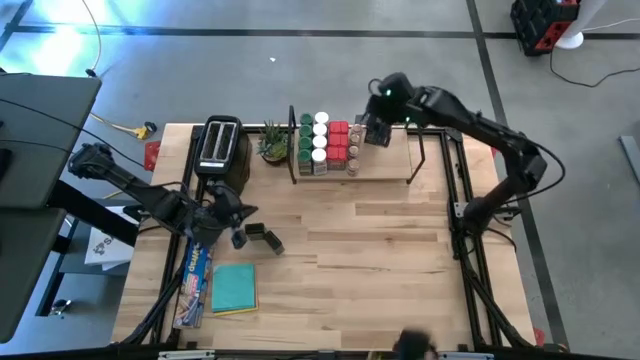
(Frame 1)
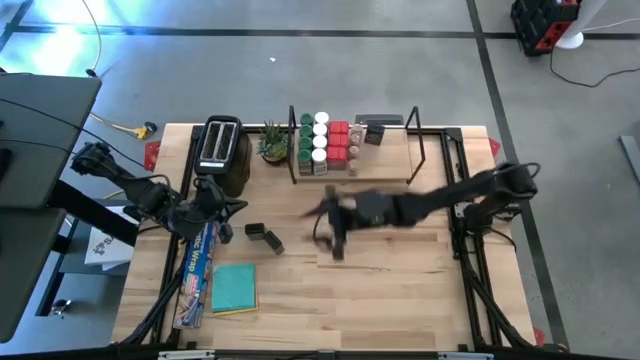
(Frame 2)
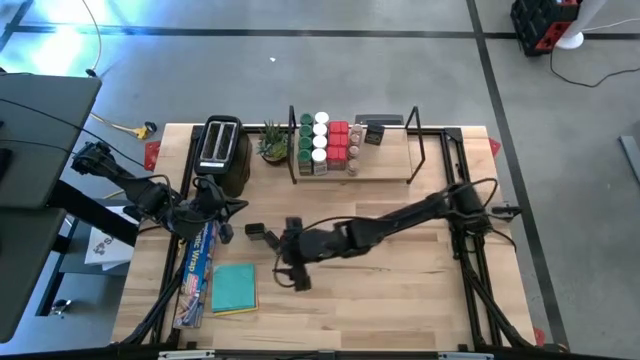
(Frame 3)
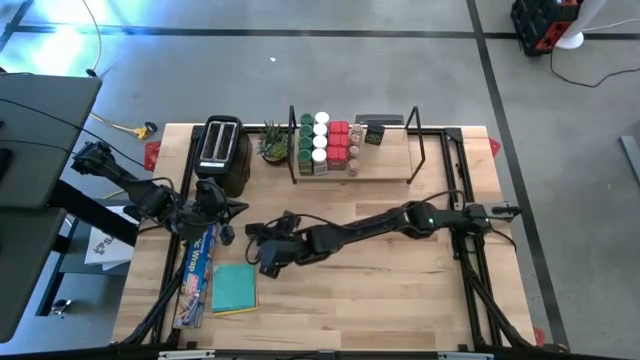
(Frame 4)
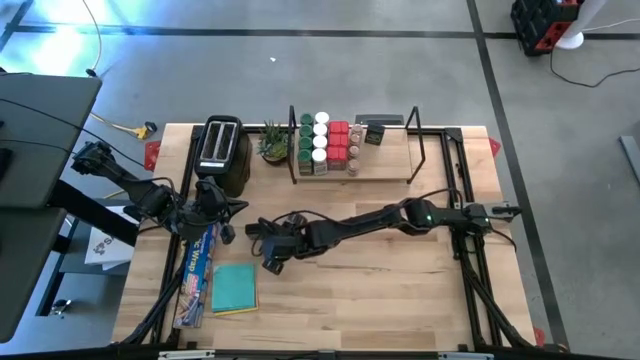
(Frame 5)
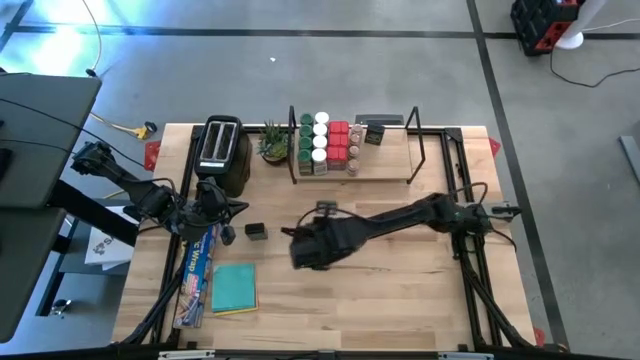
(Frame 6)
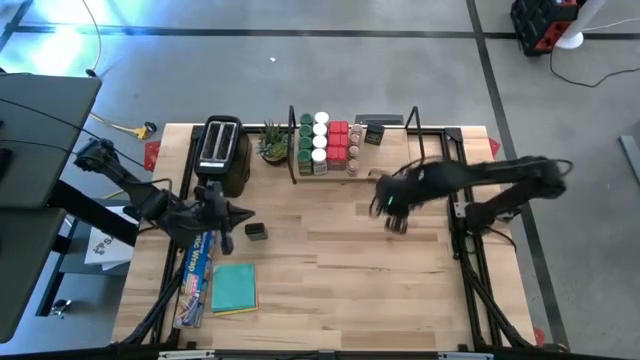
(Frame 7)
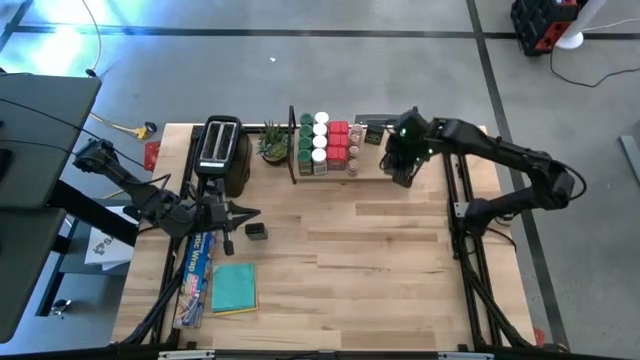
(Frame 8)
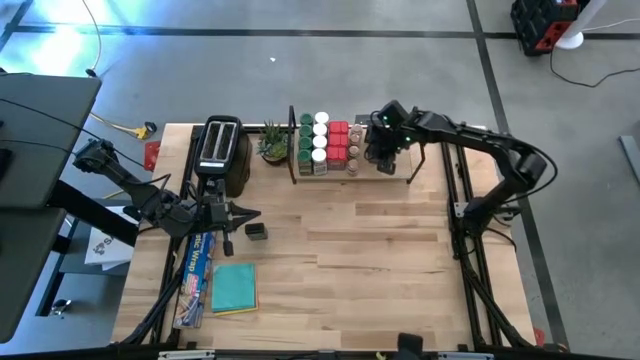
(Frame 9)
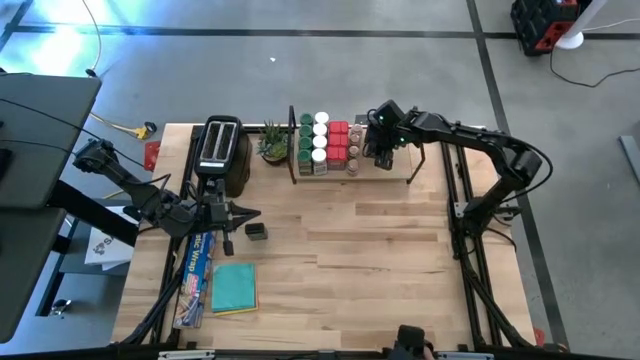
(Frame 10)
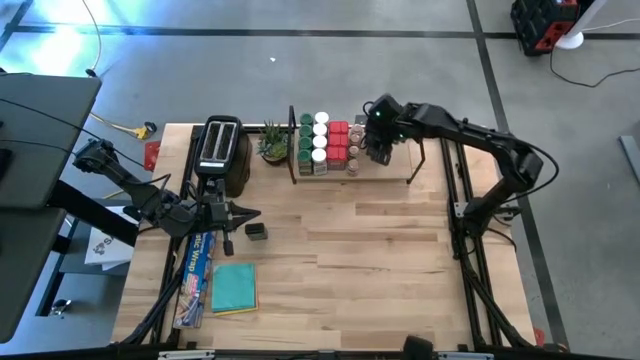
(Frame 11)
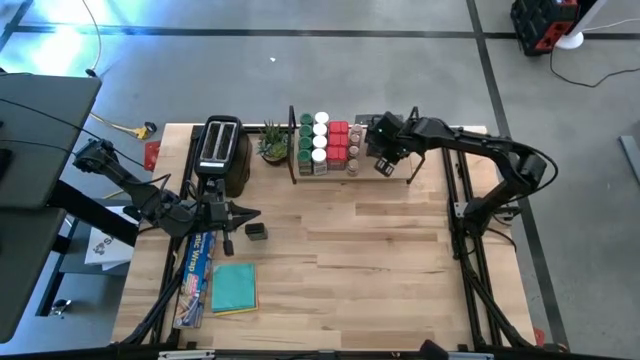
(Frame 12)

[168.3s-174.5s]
Task: Shelf spices
Put the right black seasoning can on the shelf aligned with the other black seasoning can

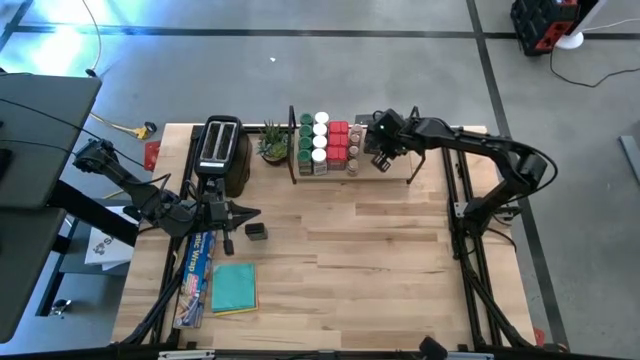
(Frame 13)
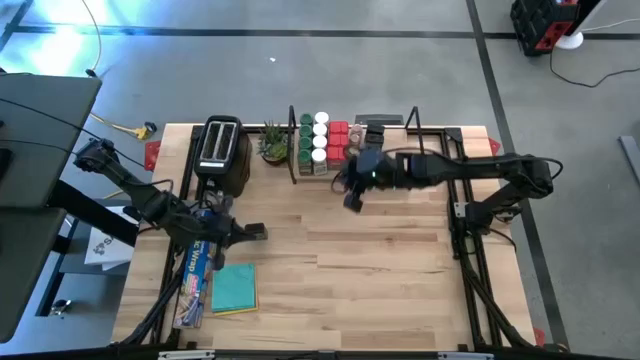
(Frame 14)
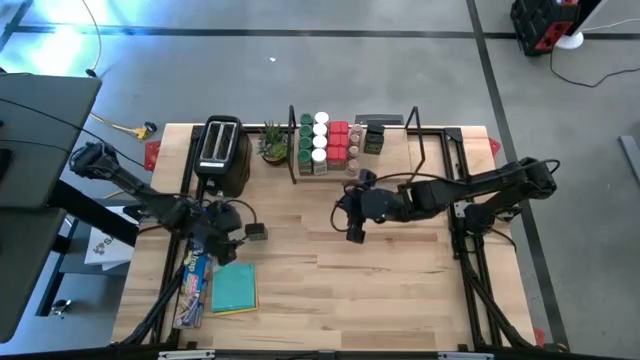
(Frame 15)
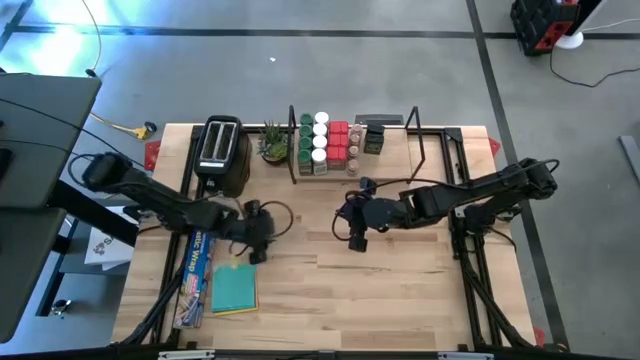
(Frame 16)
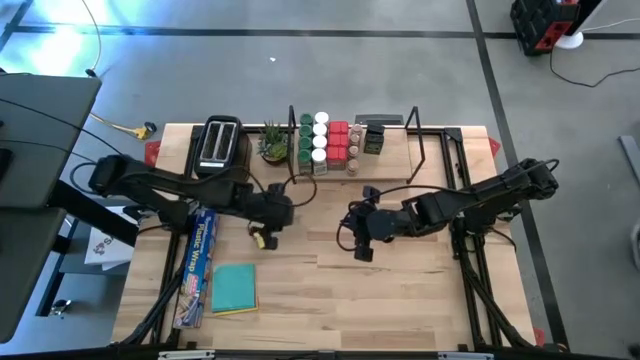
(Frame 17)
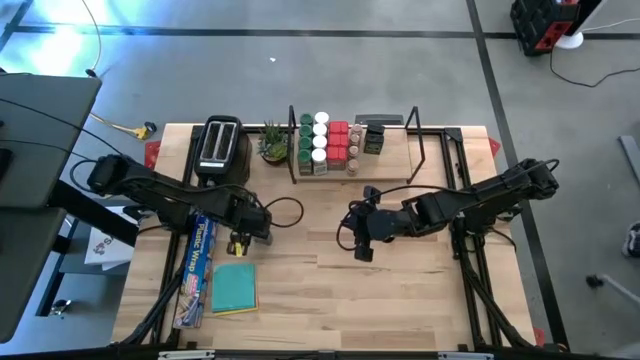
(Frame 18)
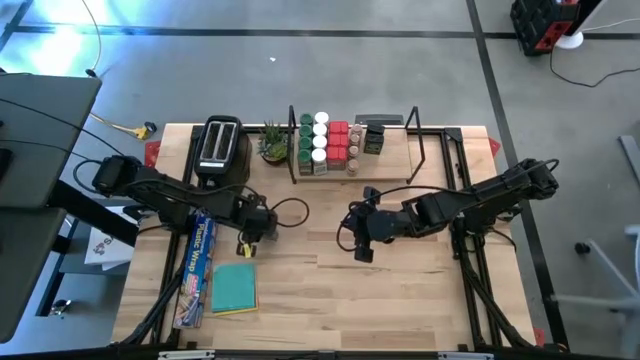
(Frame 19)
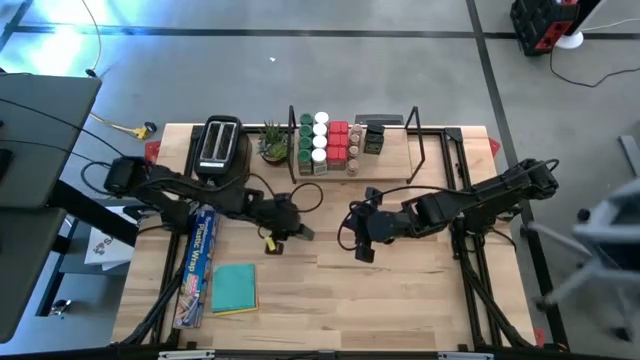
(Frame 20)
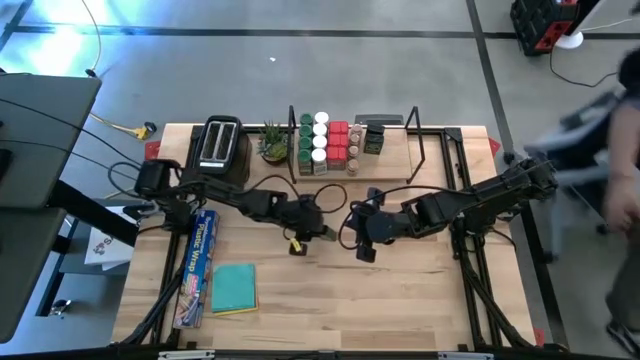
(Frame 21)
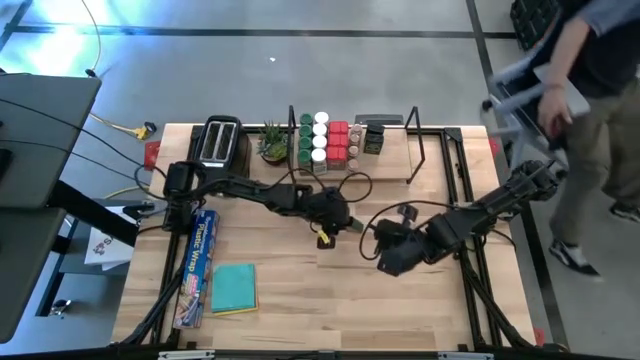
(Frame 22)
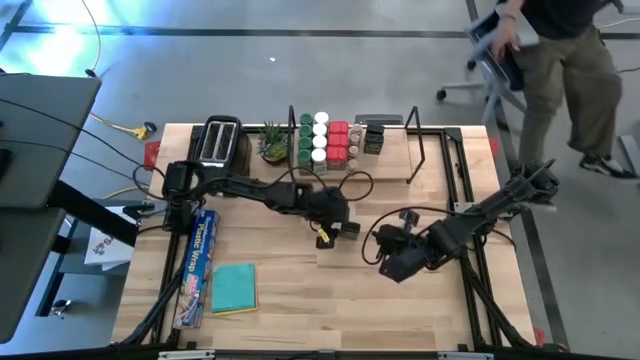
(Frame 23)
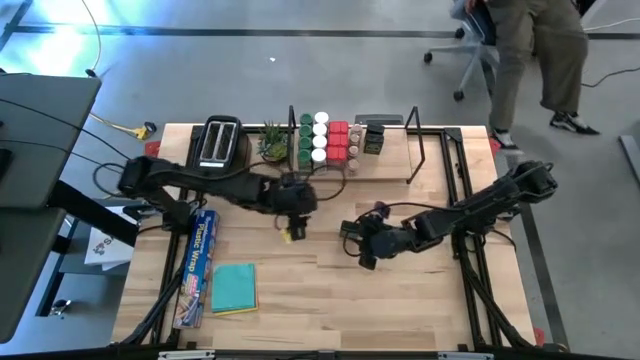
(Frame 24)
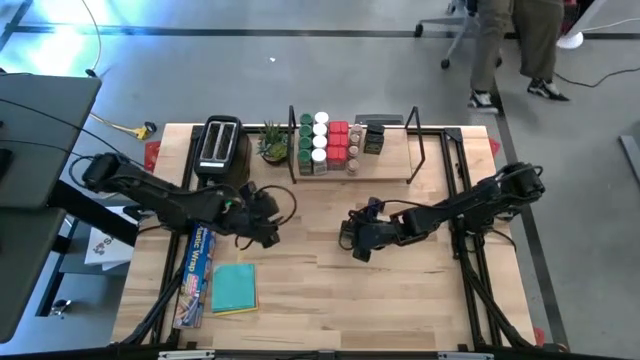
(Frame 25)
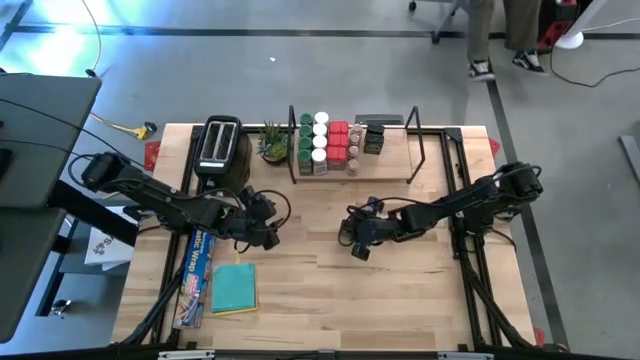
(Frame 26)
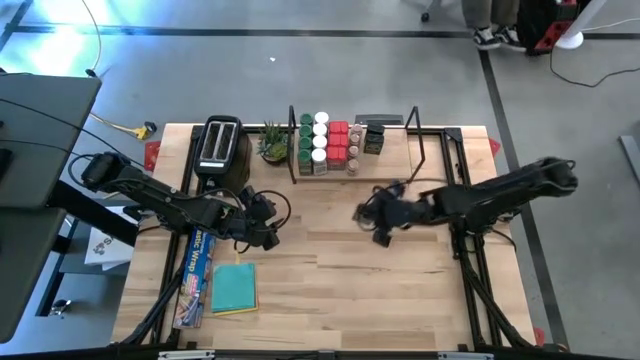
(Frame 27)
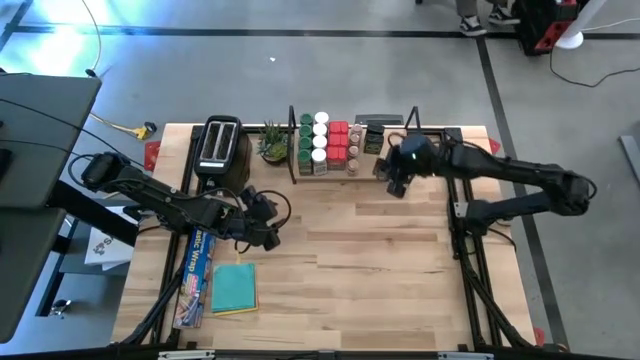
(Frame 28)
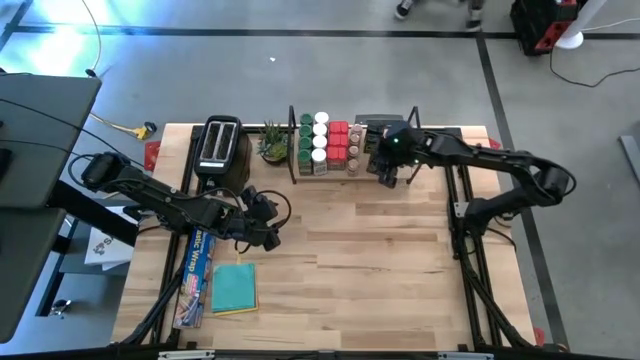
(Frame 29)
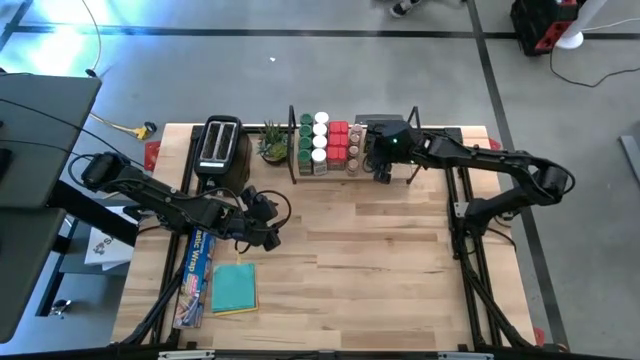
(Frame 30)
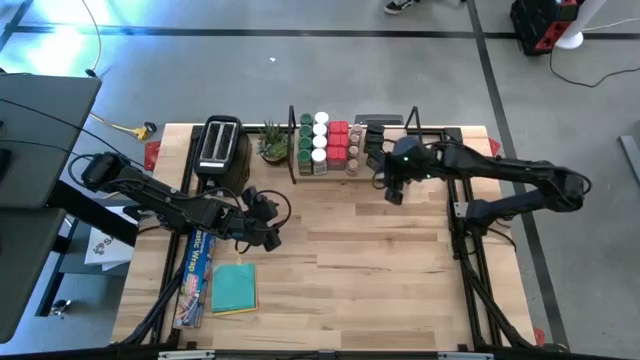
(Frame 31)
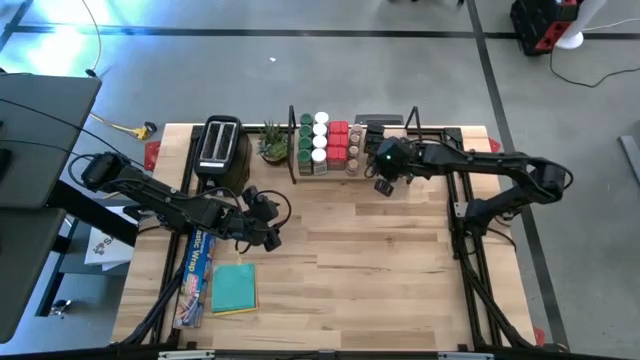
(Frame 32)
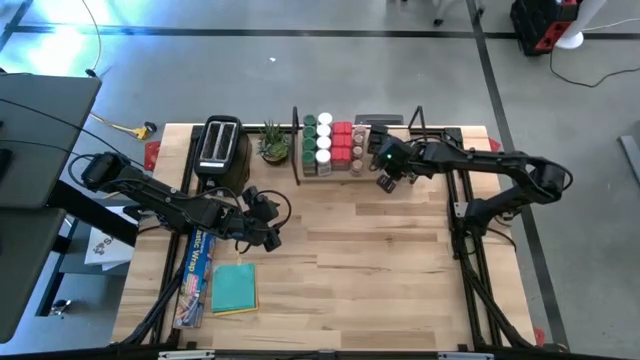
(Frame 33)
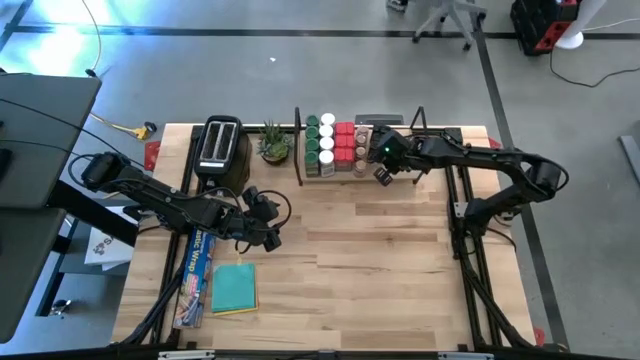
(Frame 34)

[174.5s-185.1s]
Put the black seasoning can on the shelf aligned with the other black seasoning cans

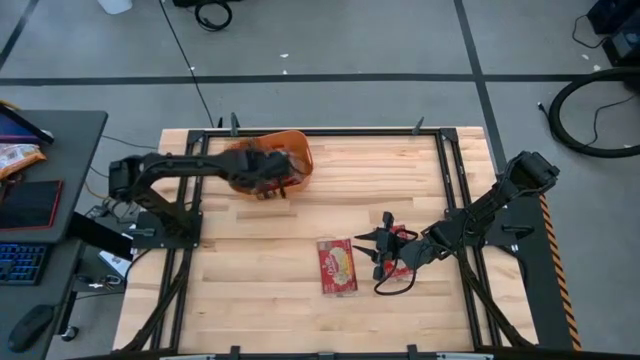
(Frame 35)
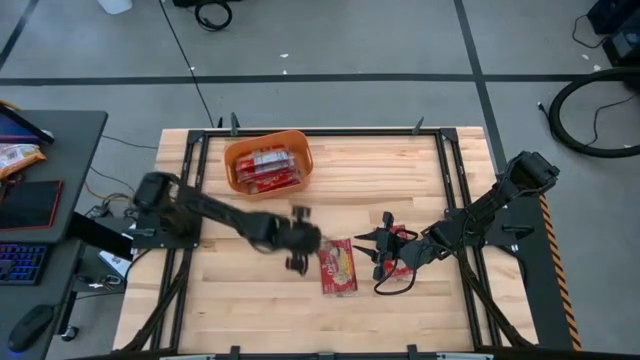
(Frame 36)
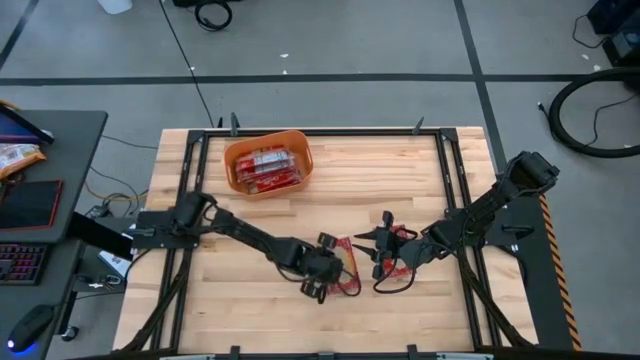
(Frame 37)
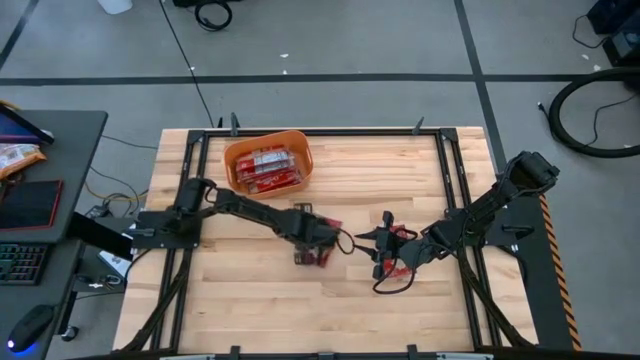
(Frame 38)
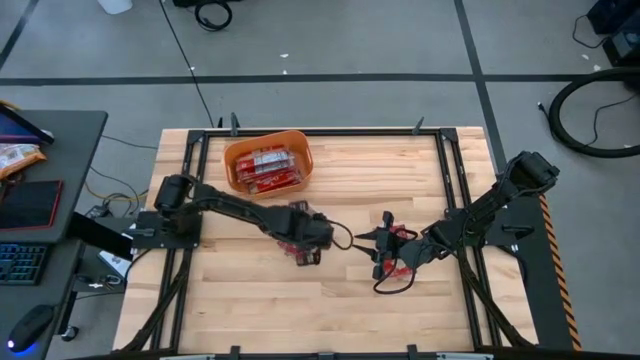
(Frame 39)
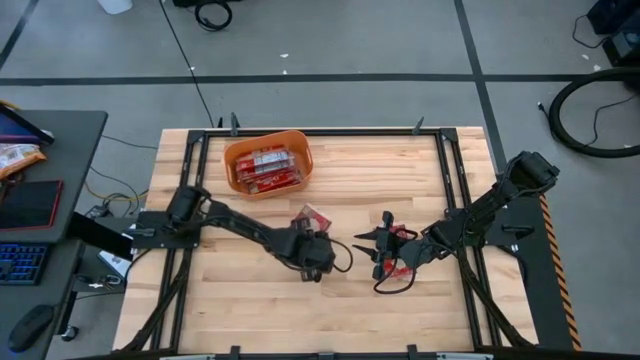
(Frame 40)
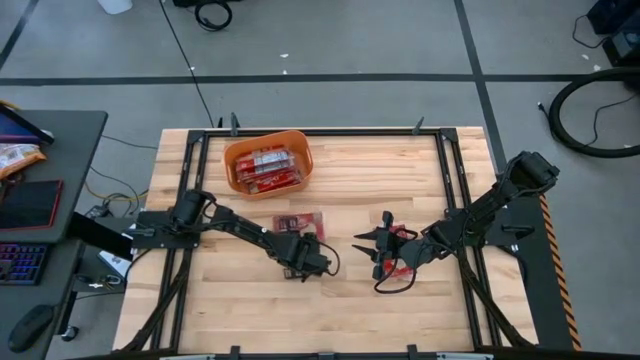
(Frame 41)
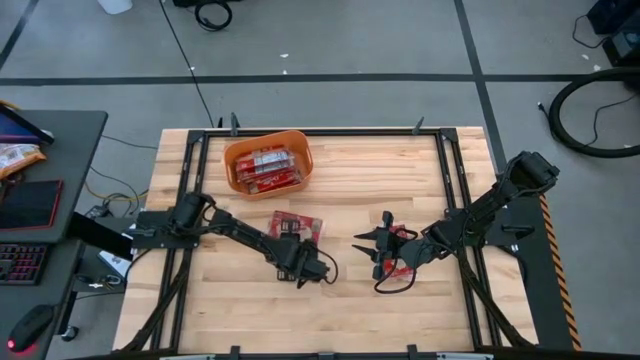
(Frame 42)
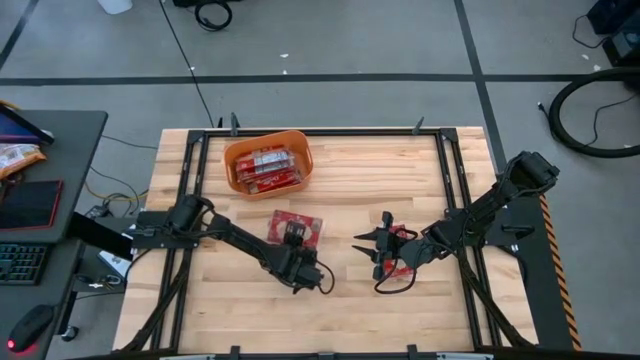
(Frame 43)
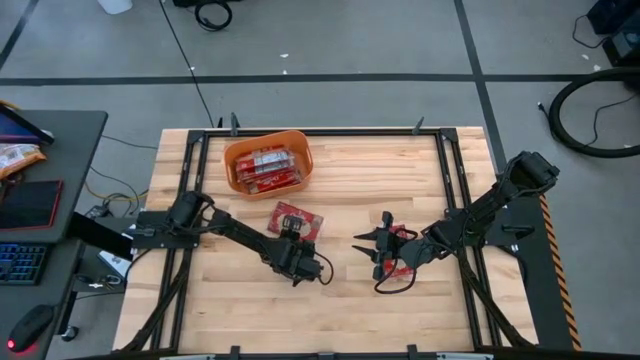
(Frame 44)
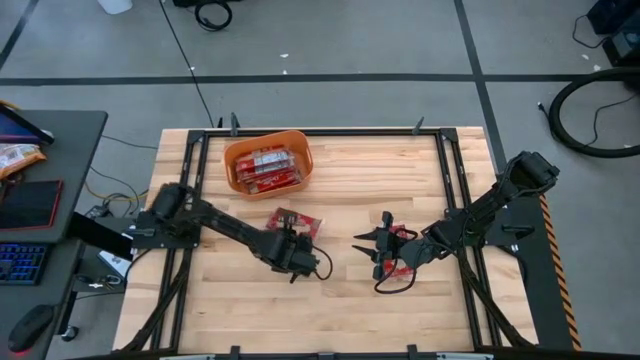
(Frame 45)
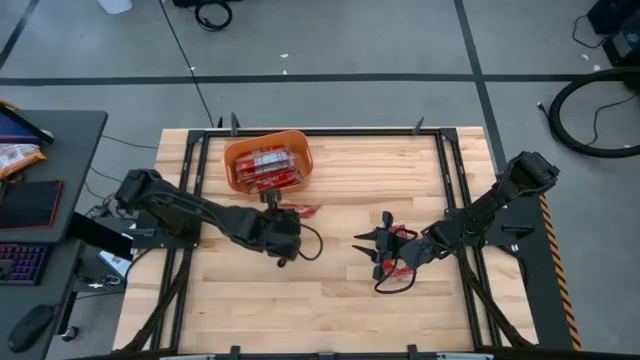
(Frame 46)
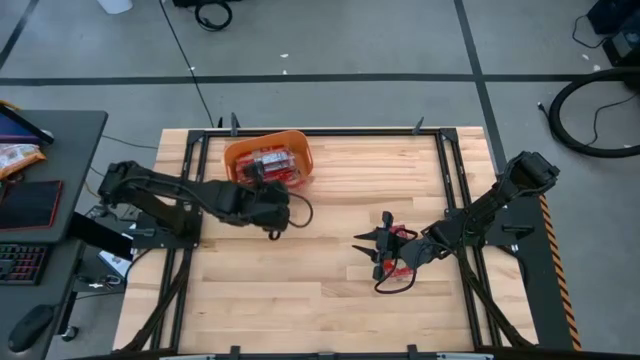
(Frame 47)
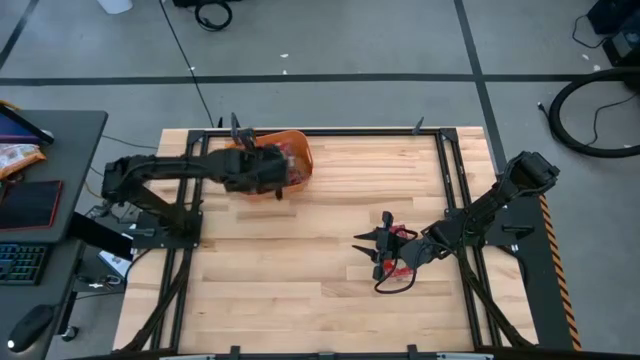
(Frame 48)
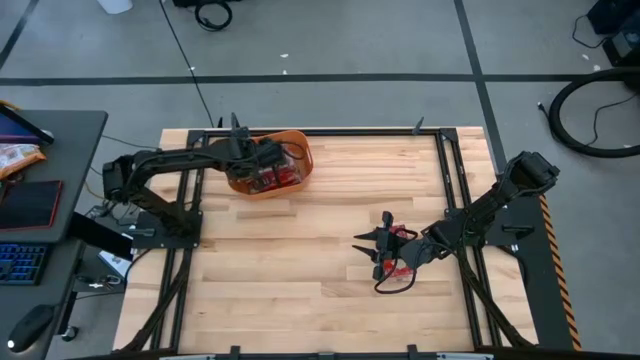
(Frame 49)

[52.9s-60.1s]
Task: Sort popcorn bags into baskets
Put the red popcorn bag into the orange bin
